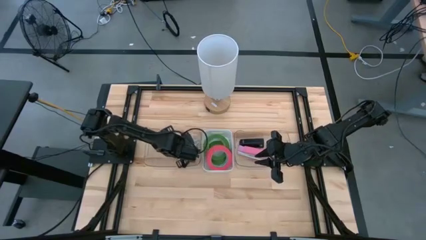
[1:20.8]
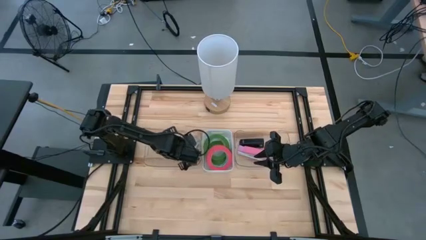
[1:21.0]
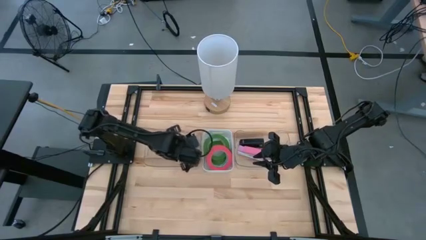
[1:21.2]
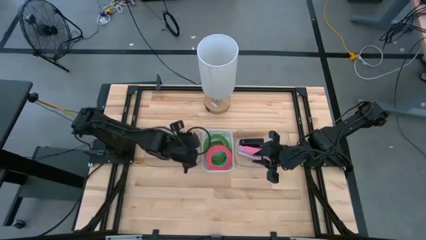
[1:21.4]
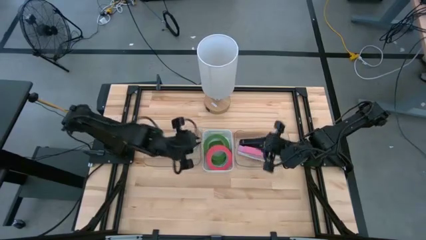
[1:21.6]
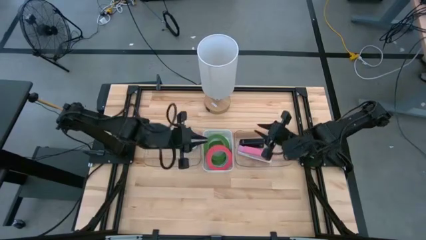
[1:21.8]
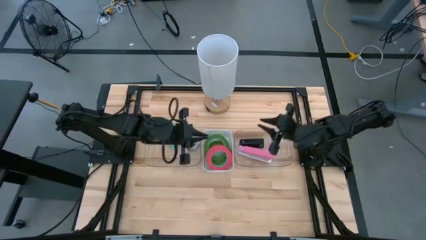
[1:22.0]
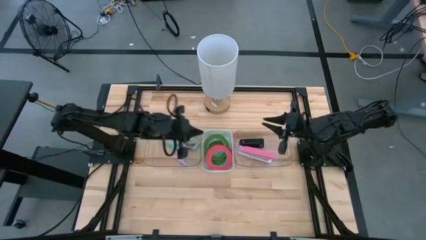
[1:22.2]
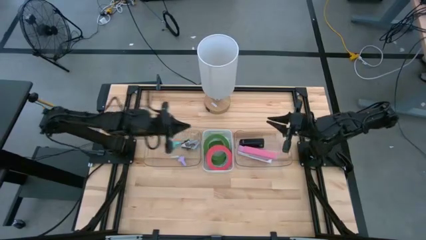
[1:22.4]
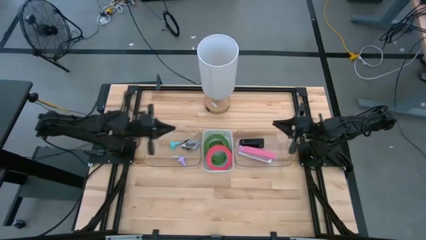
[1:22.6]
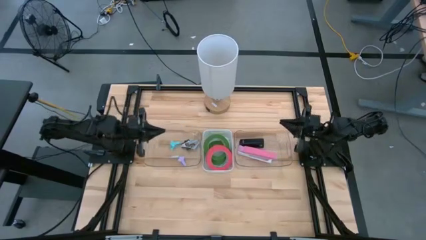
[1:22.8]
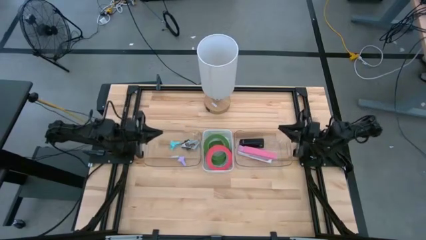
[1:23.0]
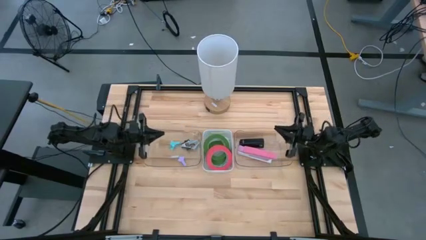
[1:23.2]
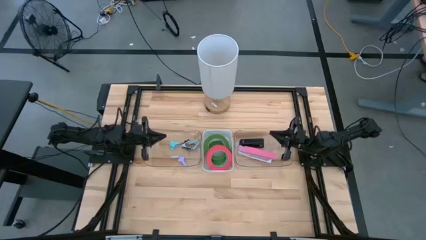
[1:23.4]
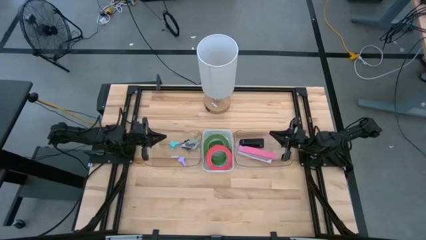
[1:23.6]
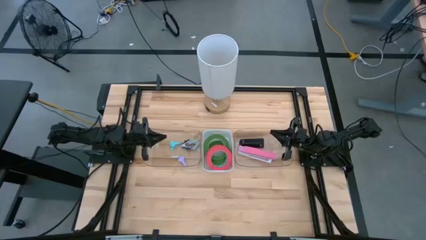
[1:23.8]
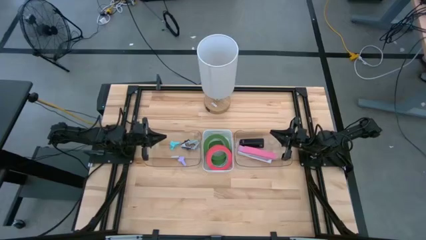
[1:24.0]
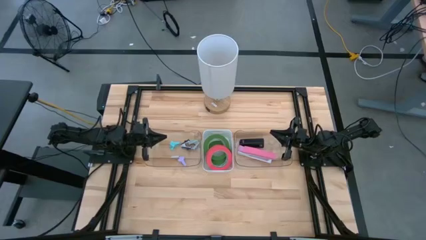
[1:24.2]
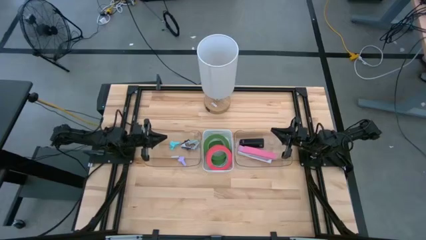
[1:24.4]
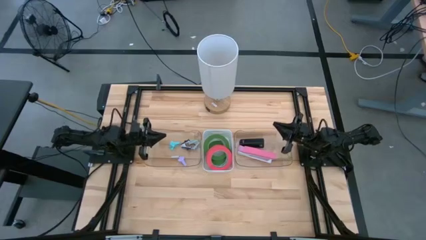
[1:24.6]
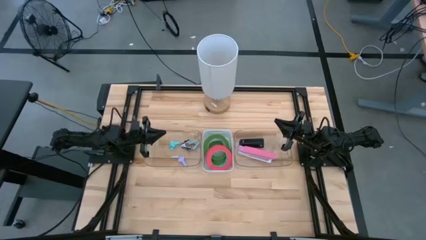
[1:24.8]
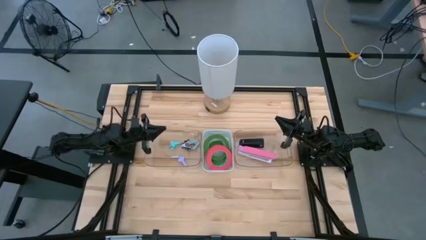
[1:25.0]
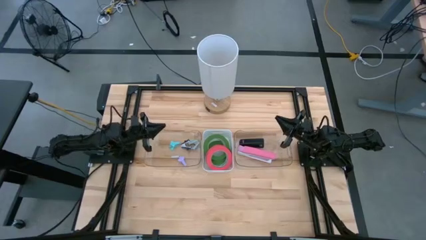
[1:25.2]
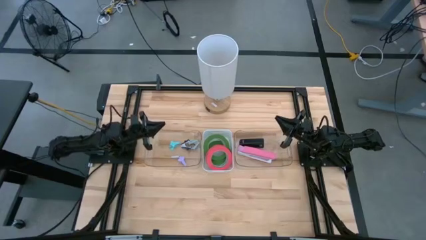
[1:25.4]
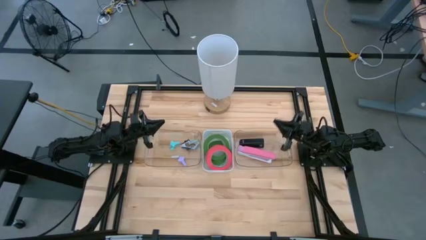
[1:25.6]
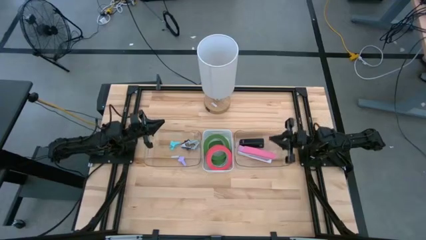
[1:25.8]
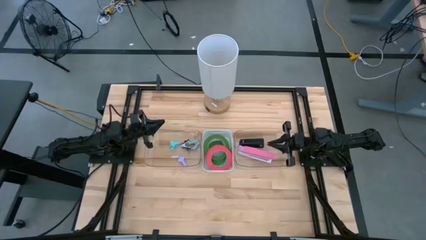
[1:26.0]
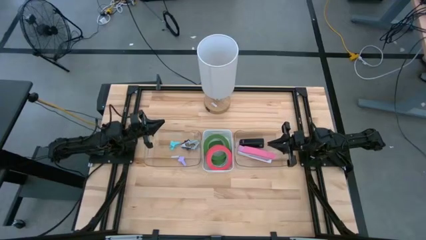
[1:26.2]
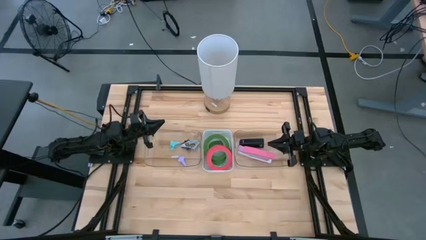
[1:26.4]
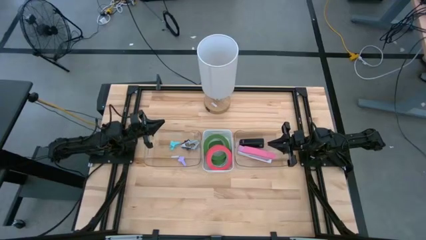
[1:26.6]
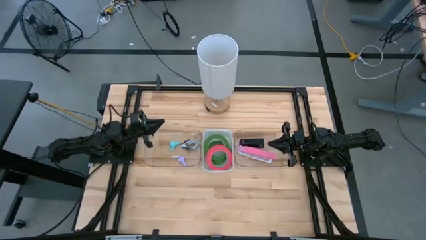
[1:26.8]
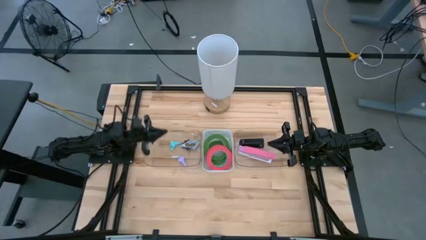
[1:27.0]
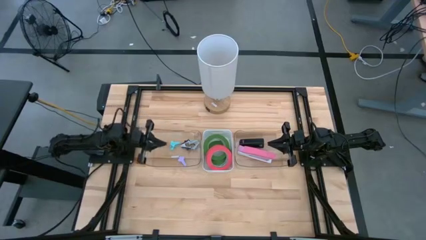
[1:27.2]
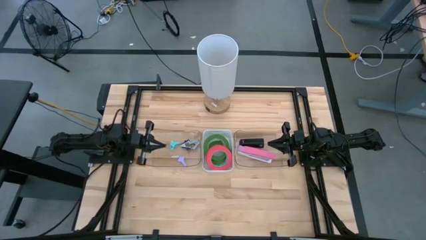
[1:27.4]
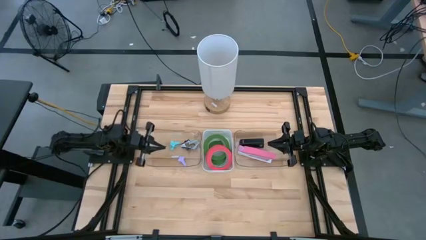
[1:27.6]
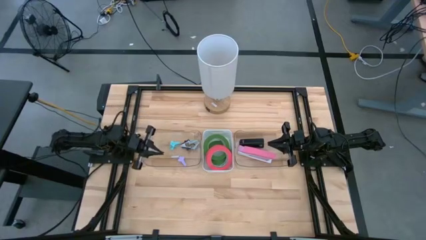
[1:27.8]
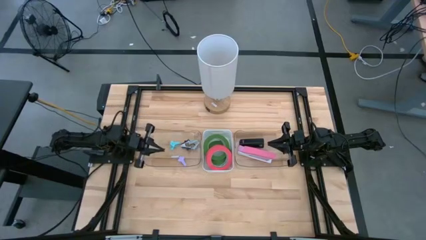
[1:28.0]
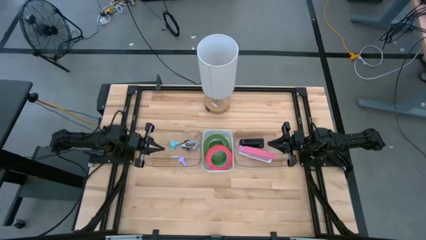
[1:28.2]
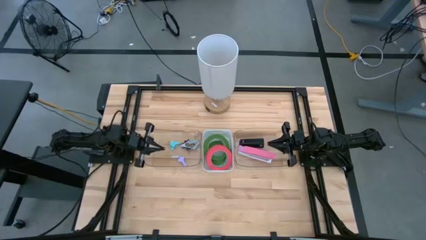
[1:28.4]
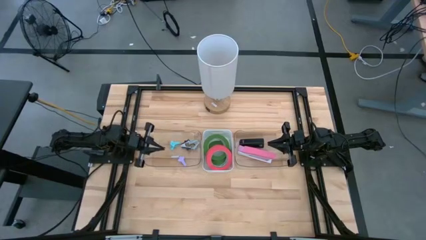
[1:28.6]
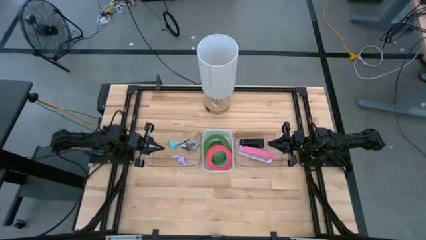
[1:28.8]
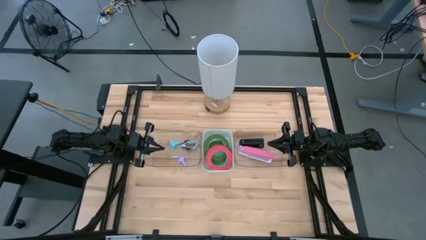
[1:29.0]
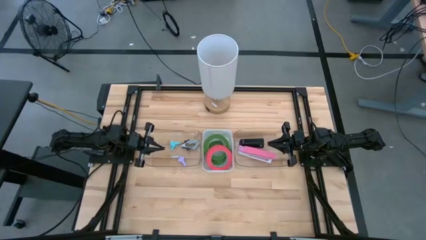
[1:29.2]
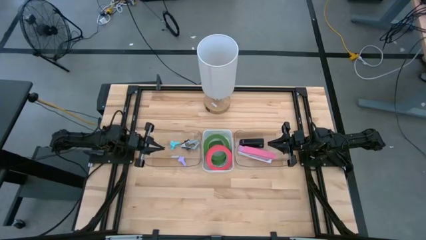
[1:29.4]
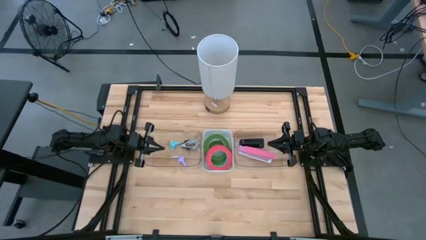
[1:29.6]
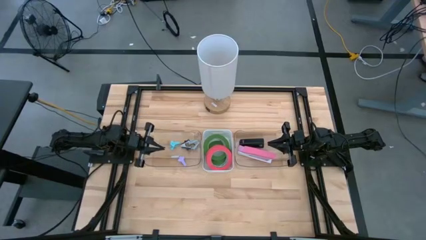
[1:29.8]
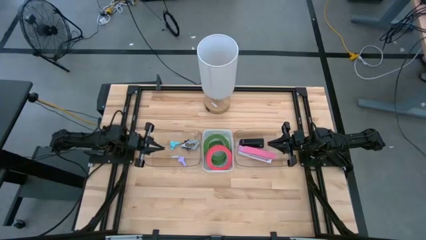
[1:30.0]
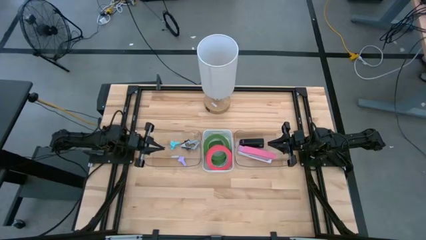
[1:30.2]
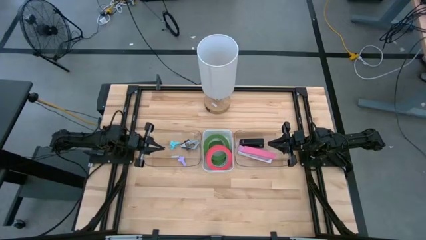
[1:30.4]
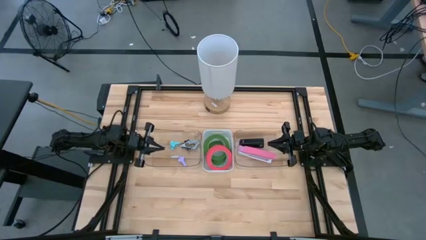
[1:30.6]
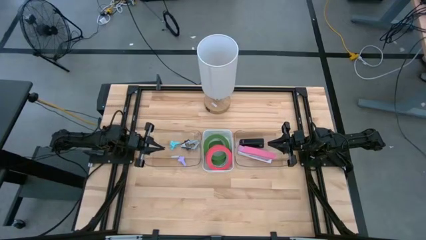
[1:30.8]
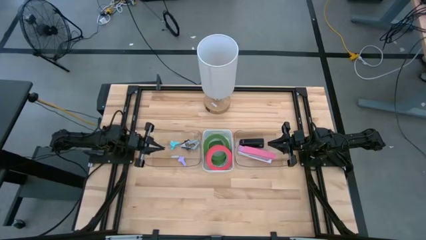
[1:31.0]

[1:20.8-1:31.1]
Task: Pick and place Stapler, Stapler remover, tape
Return to Home Position

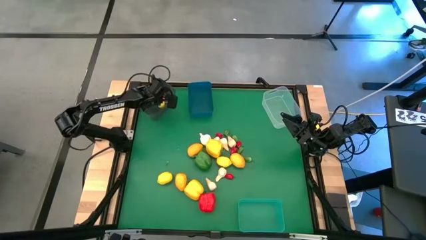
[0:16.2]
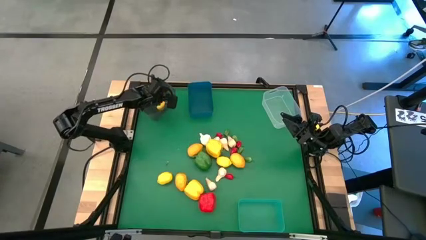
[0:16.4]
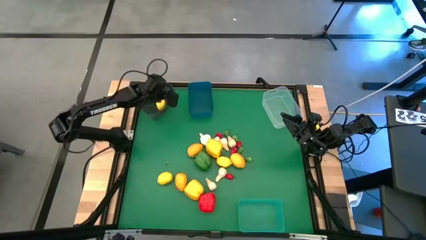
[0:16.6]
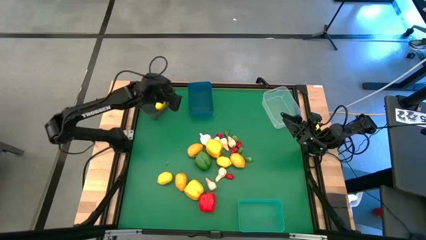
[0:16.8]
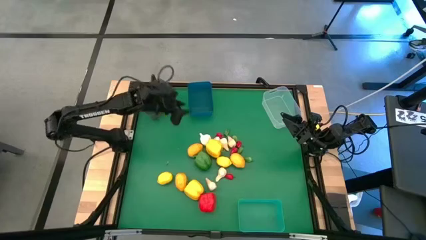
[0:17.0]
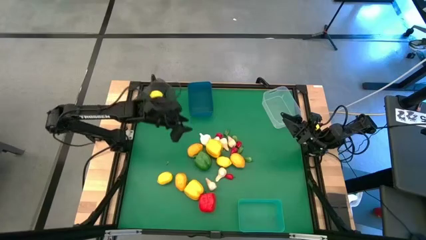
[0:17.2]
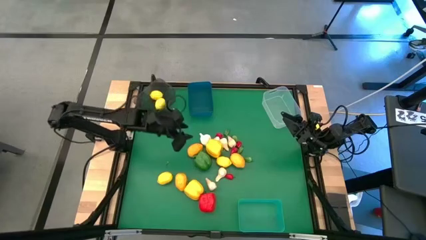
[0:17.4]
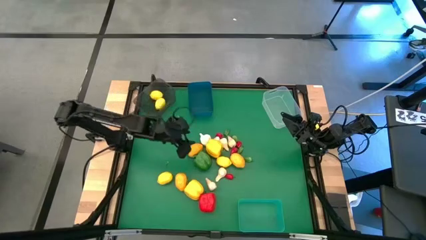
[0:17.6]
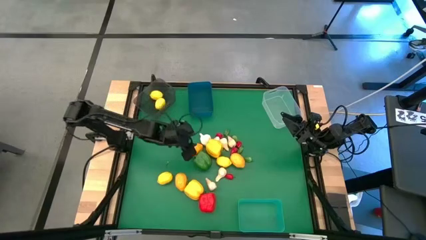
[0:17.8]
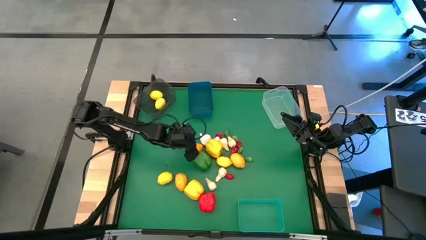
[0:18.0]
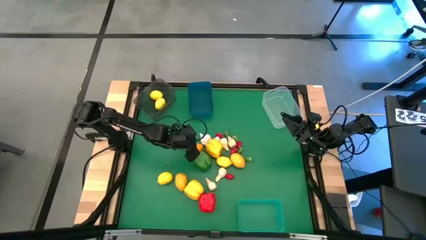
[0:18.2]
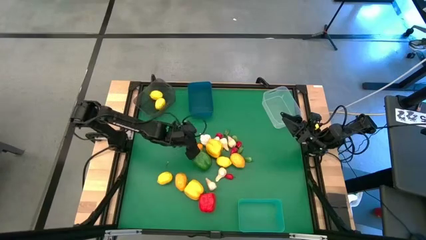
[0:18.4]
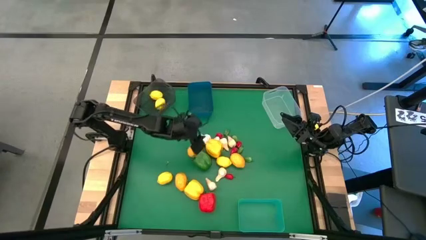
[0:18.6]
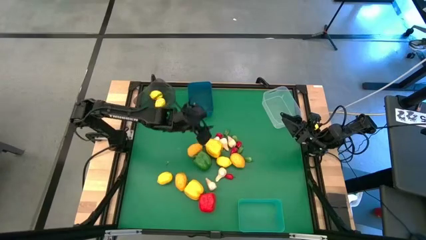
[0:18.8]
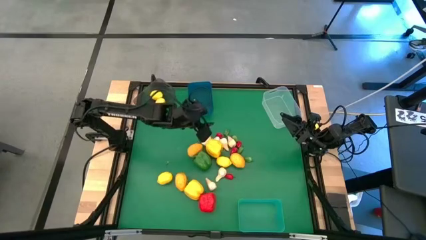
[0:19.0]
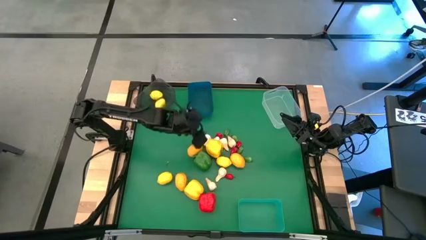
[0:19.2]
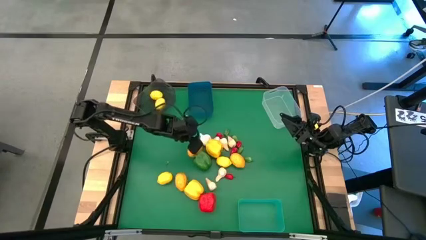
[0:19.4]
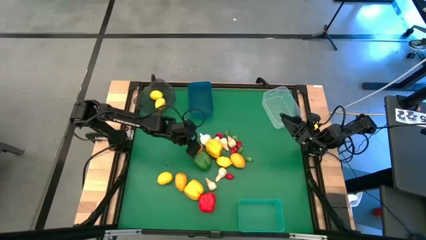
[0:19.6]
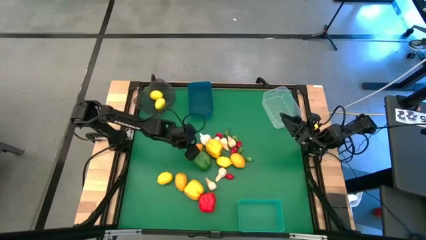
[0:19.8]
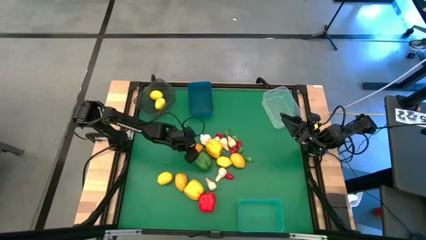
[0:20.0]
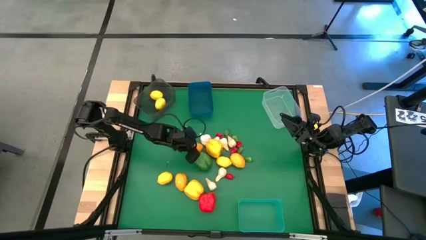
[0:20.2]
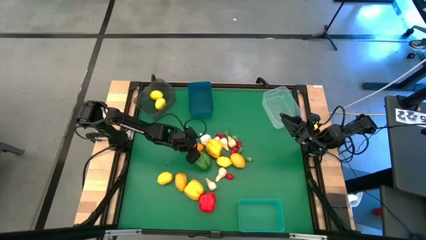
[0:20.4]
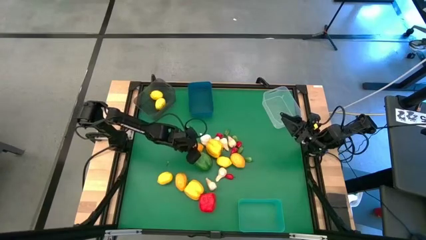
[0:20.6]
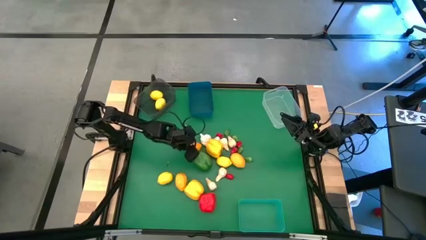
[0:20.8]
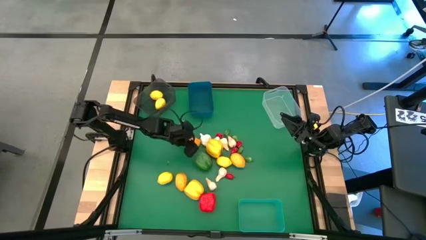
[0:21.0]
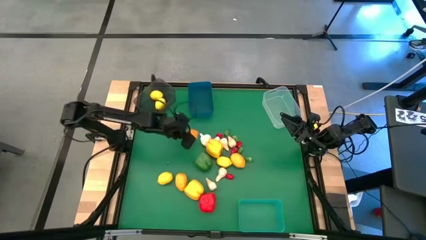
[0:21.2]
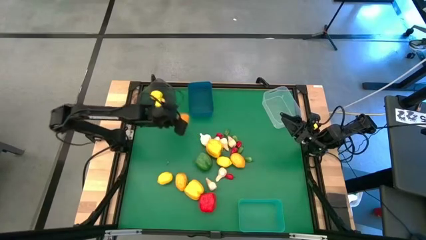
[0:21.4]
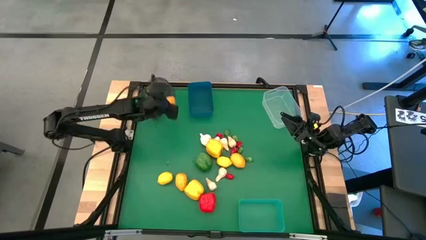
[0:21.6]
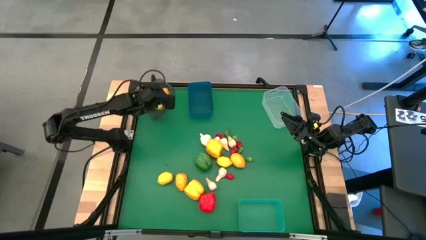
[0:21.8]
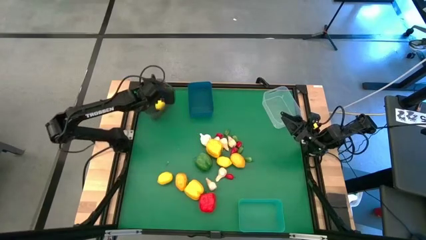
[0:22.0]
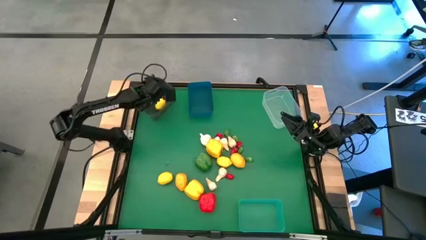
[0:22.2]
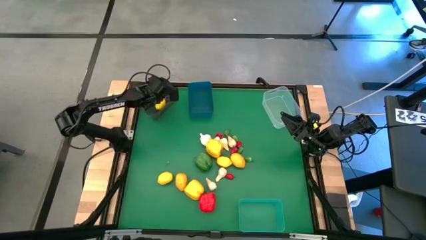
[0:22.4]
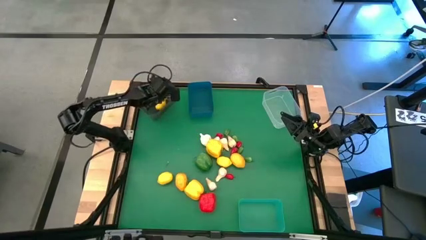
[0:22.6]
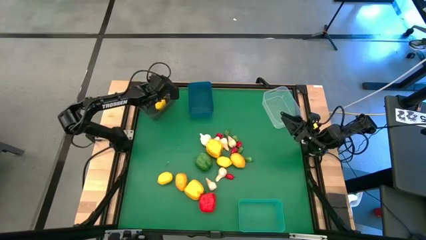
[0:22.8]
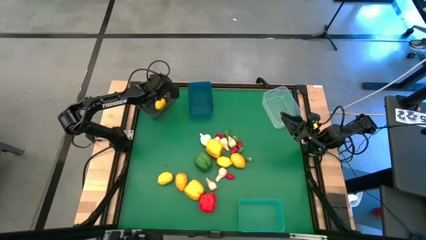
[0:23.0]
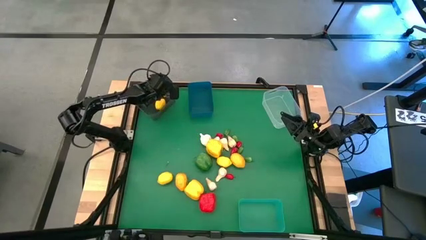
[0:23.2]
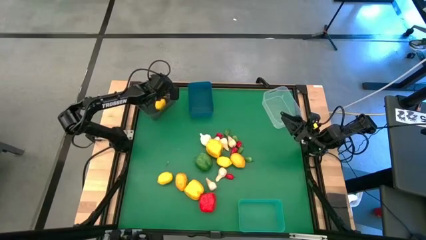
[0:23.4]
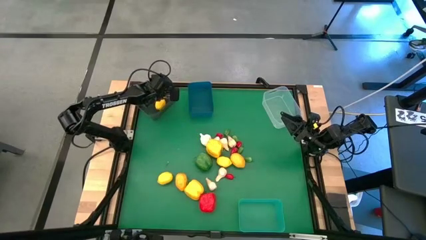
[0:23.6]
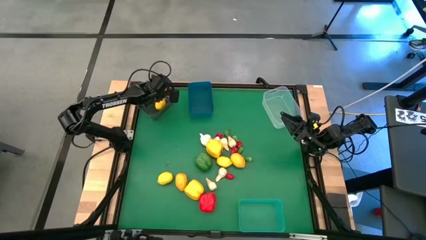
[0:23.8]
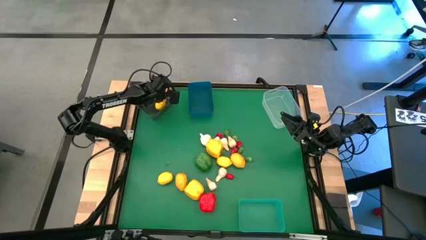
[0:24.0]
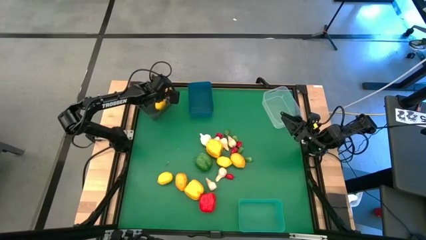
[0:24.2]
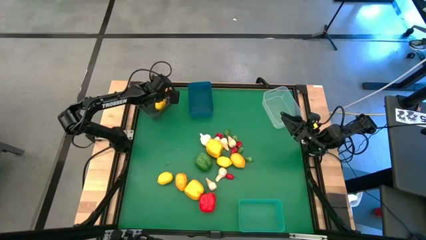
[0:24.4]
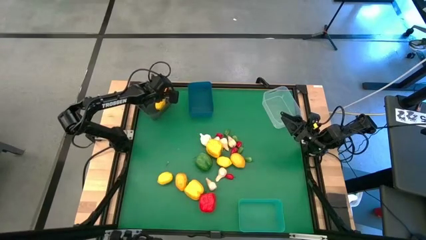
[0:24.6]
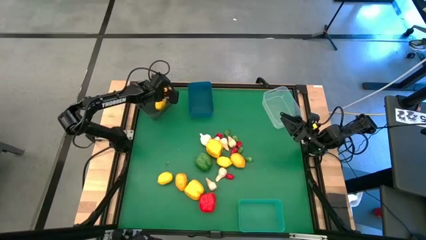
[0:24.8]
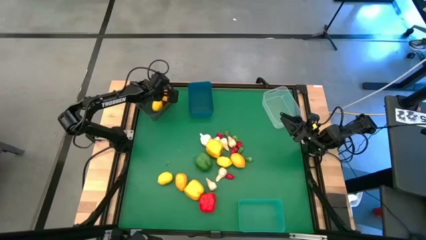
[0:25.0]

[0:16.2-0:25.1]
Task: Sort produce into baskets
Put the top right orange lemon into the black bin
